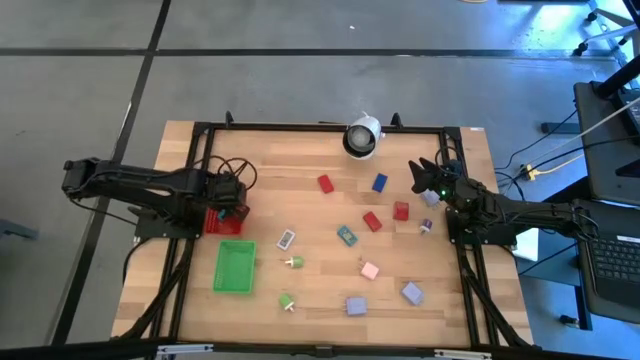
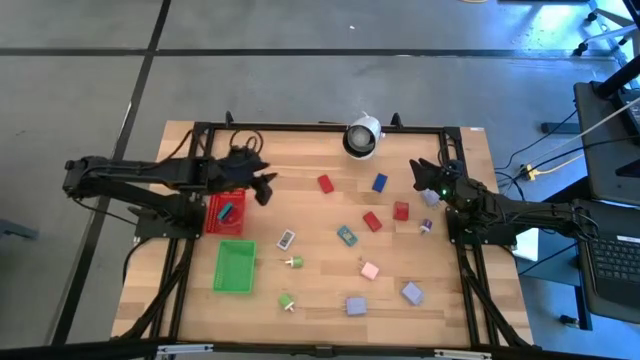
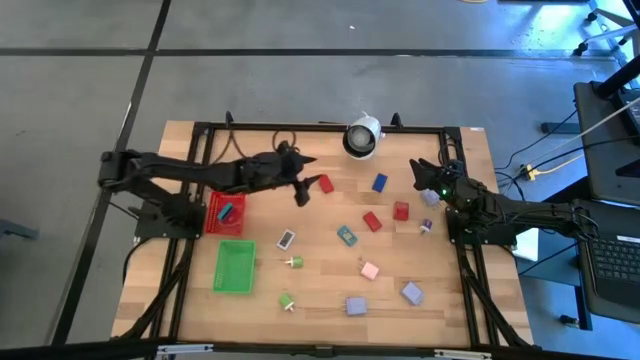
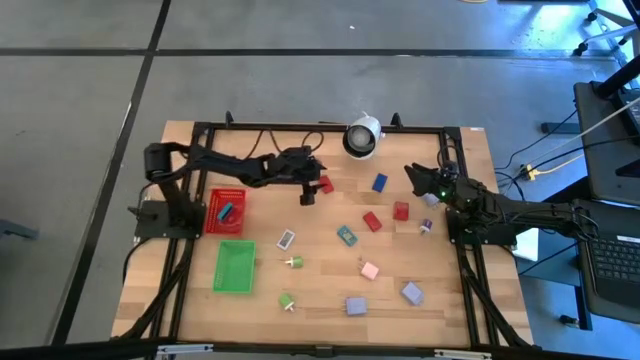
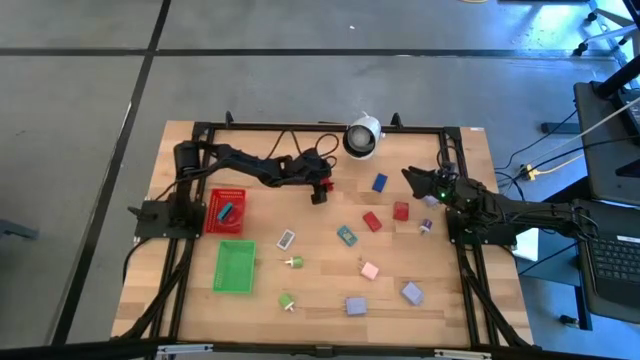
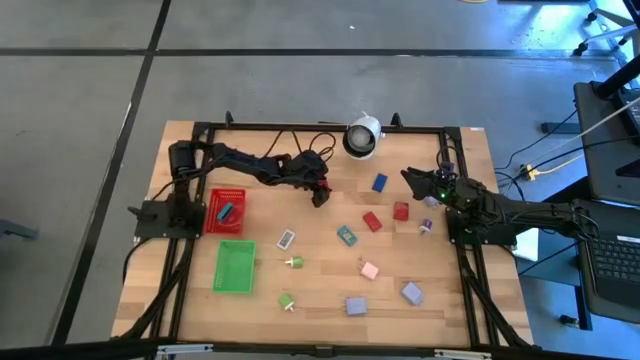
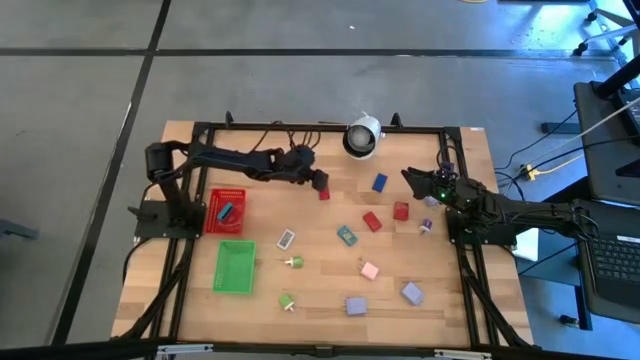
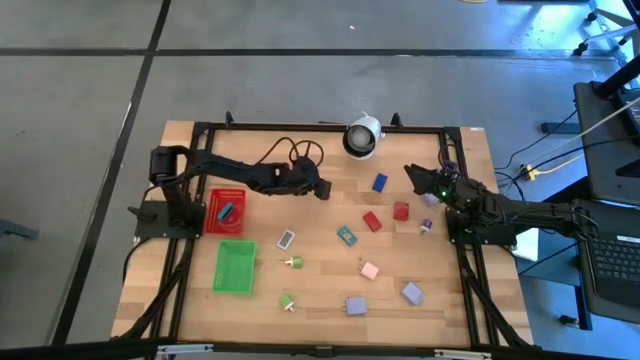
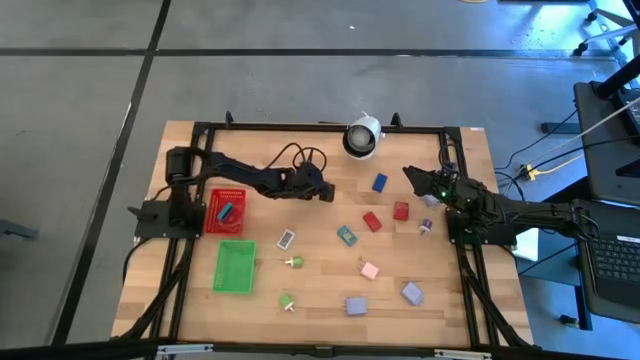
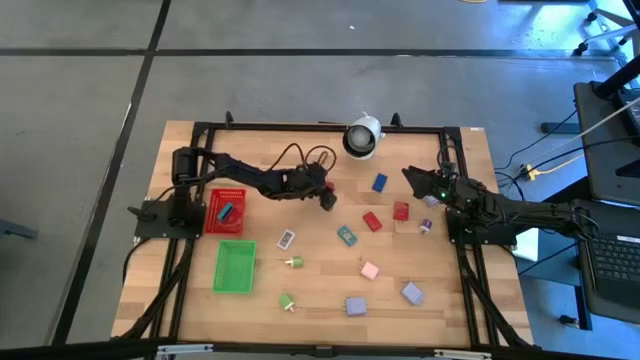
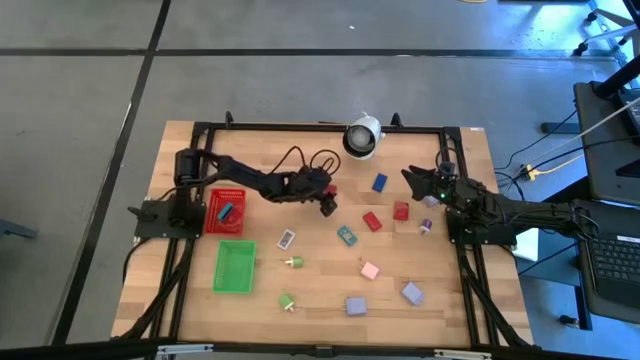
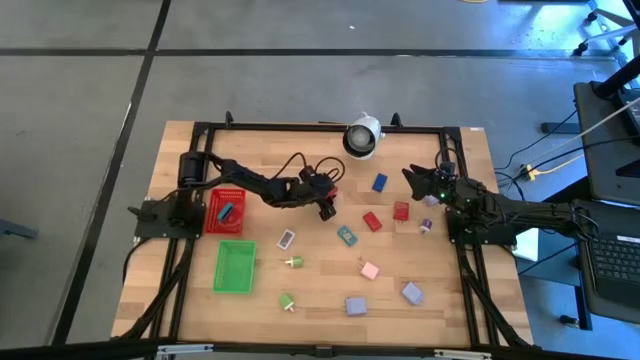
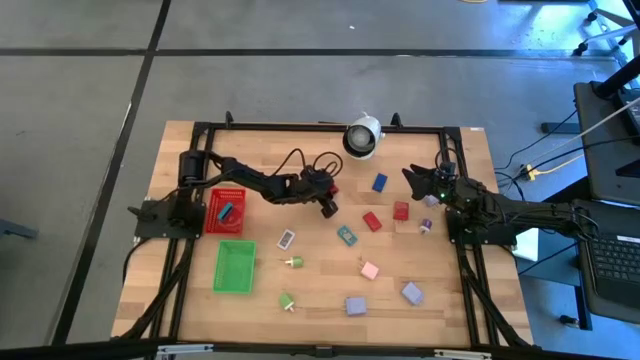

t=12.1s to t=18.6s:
Task: Pick & Place Office items
Put the top red digital timer into the red bin

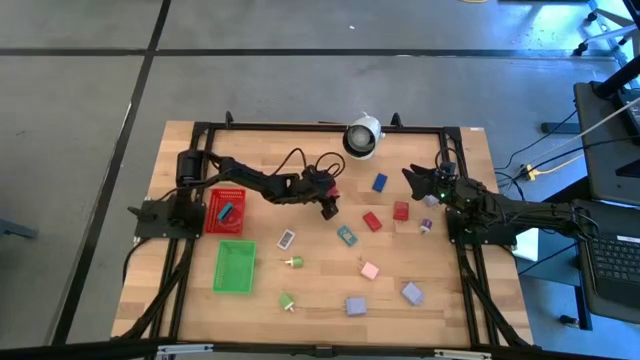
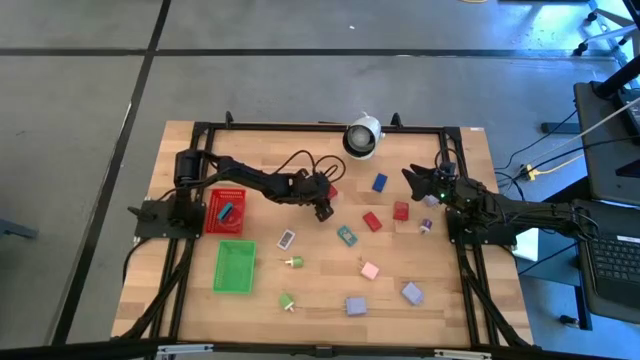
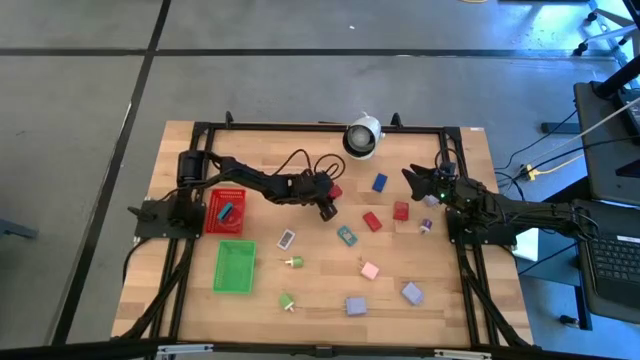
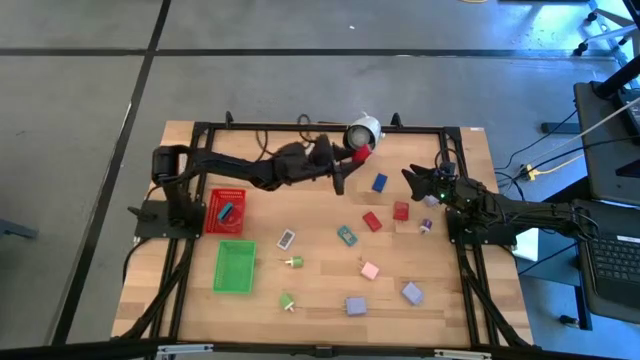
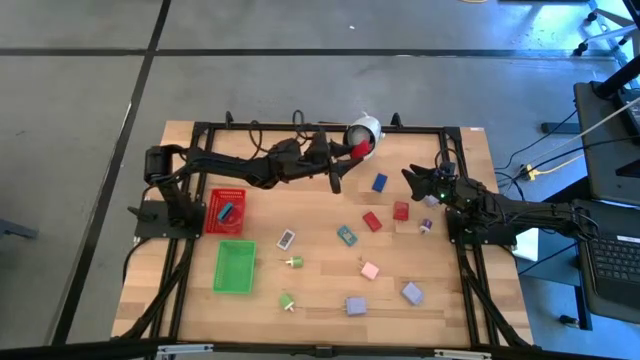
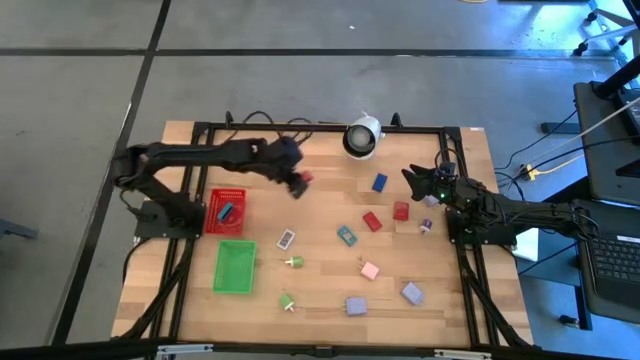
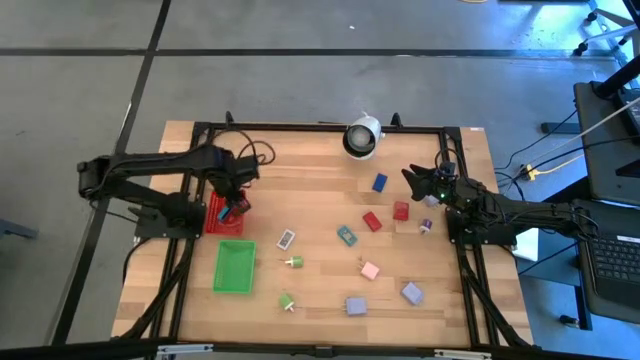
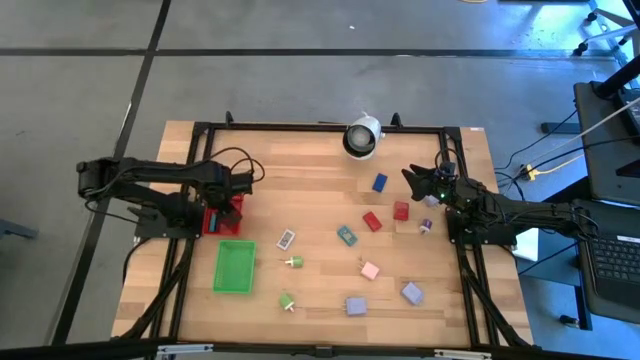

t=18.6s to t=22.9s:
Put the top red digital timer into the red bin

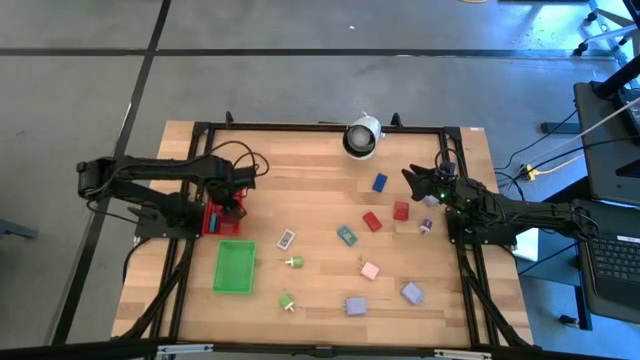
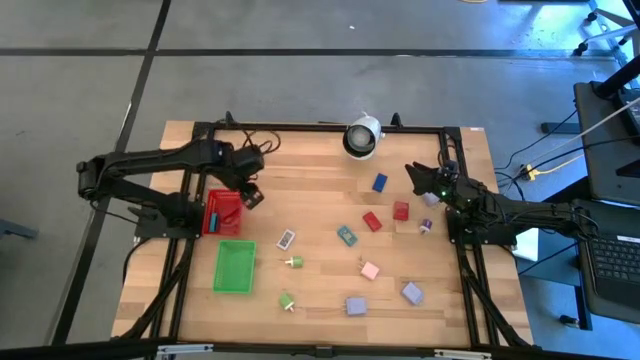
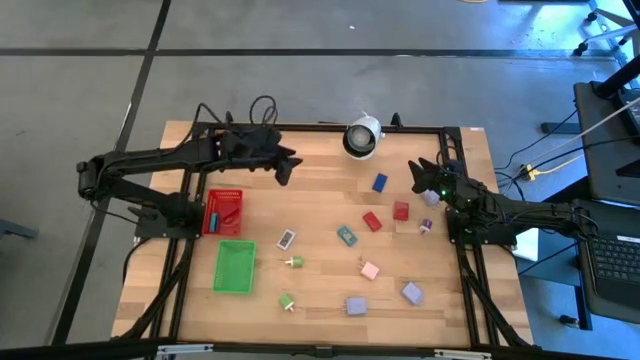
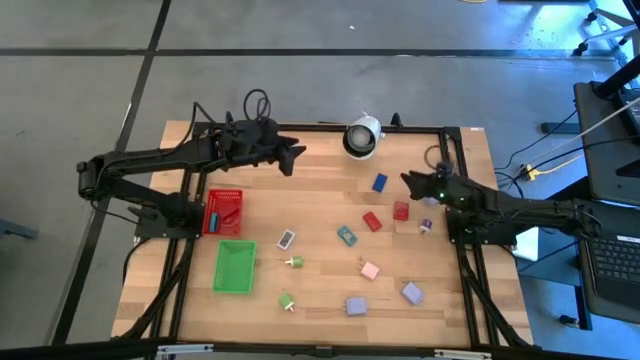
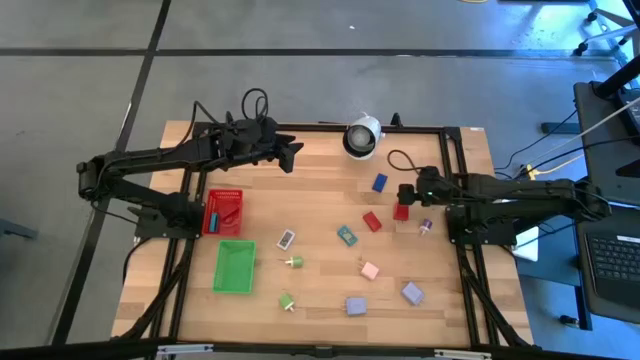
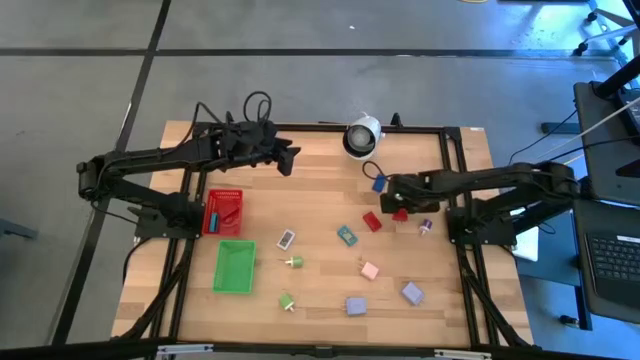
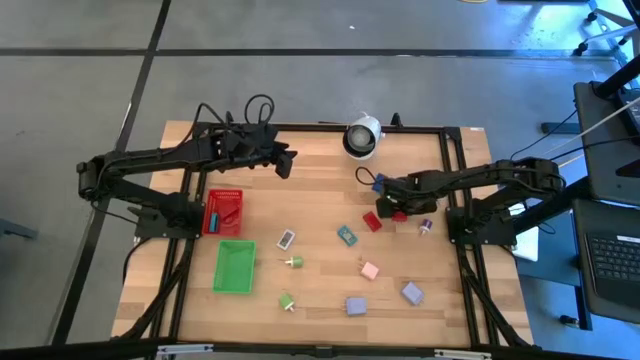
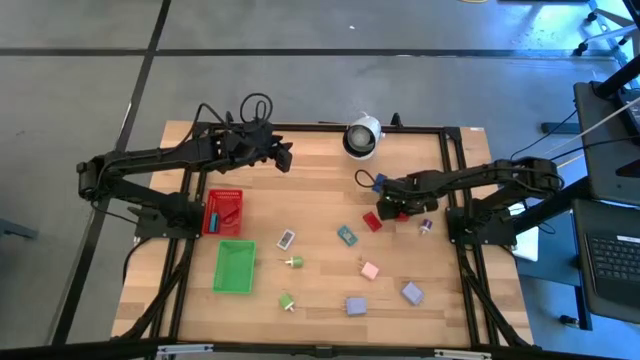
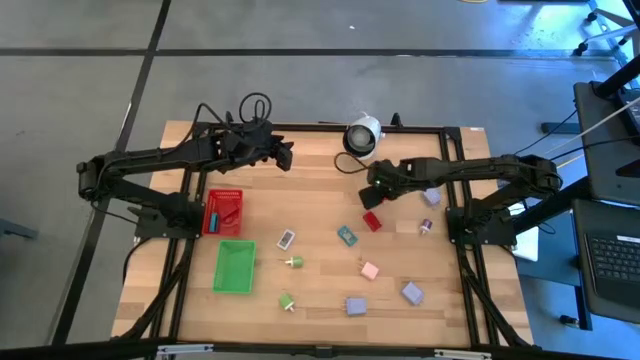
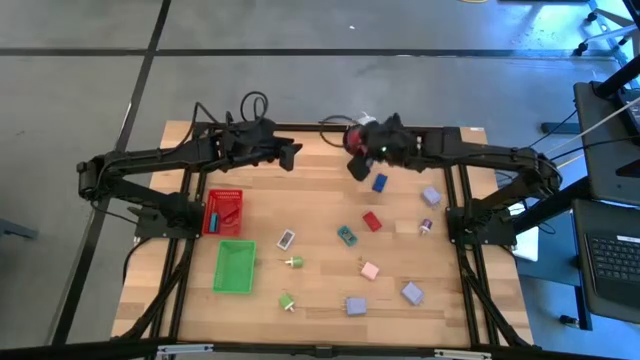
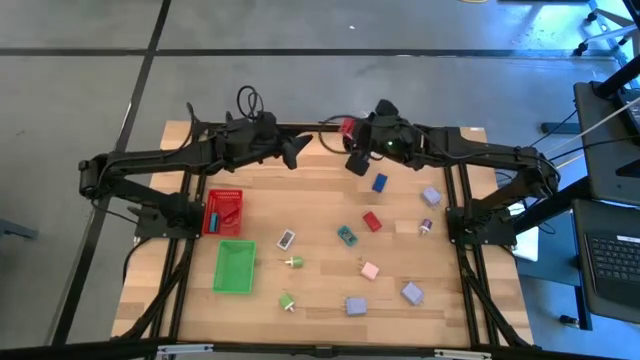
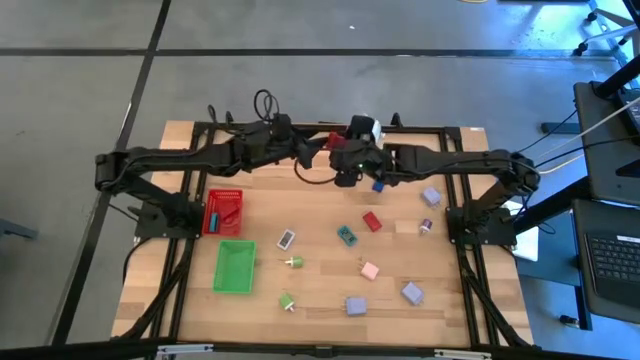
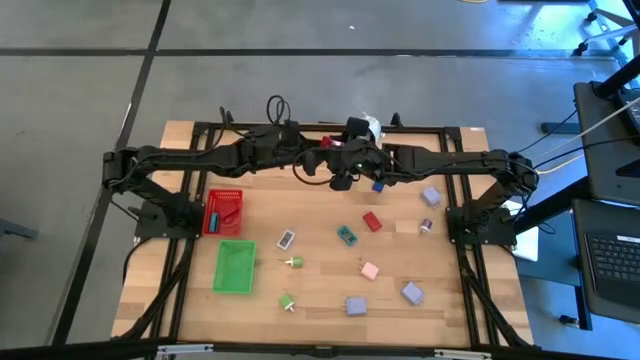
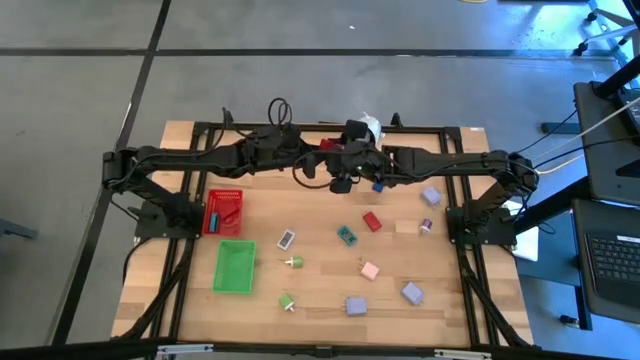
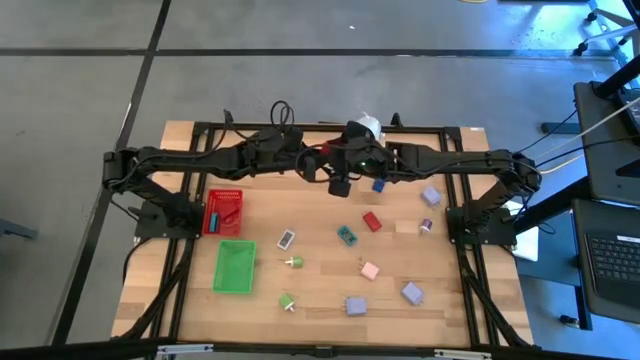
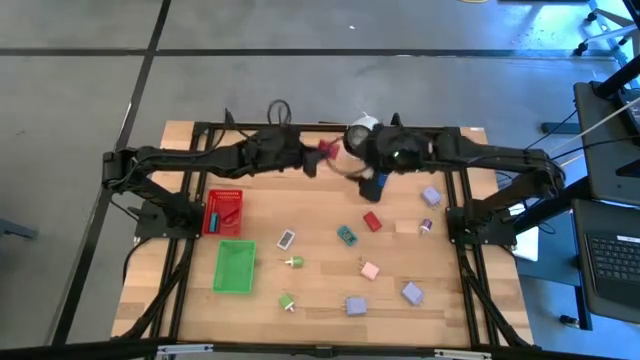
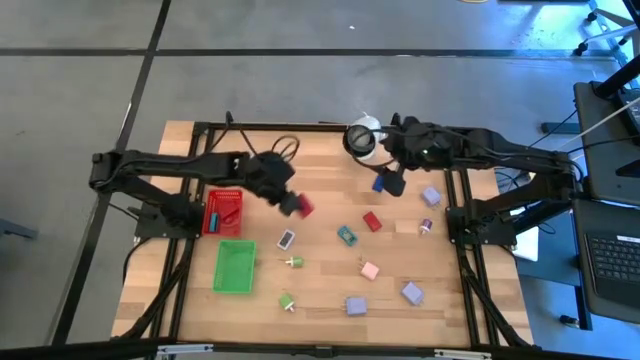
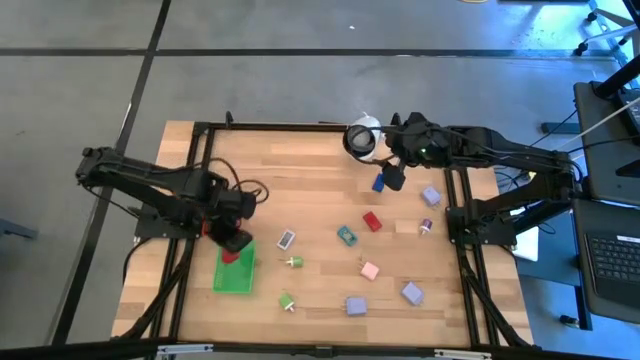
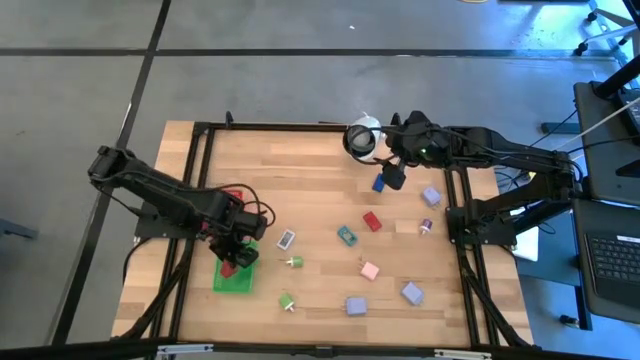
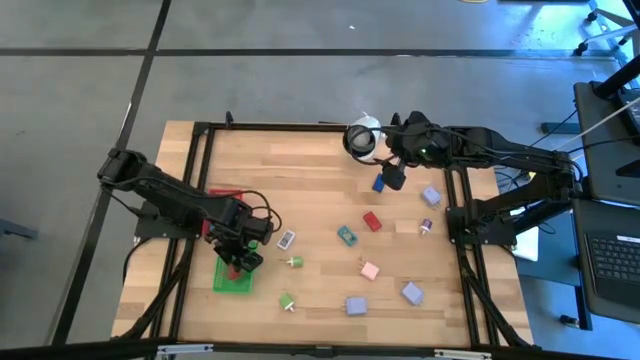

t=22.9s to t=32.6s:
Put the red charger adapter into the green bin
